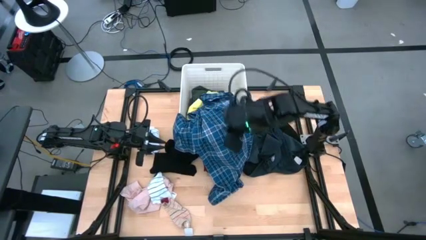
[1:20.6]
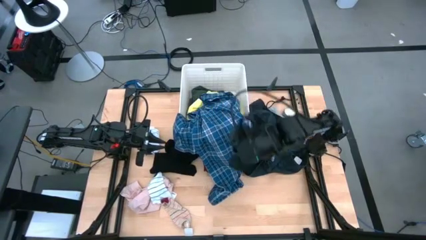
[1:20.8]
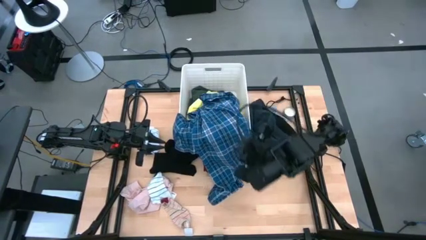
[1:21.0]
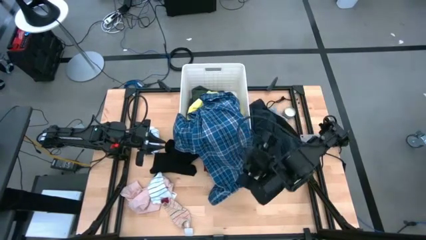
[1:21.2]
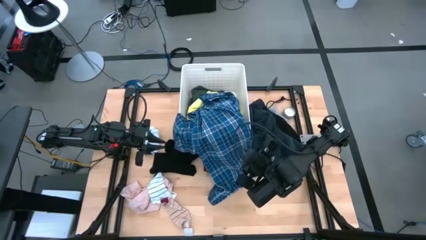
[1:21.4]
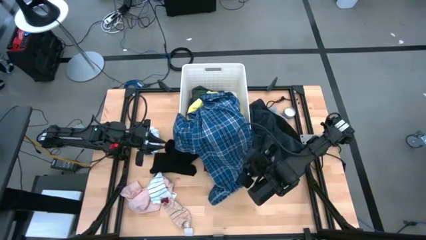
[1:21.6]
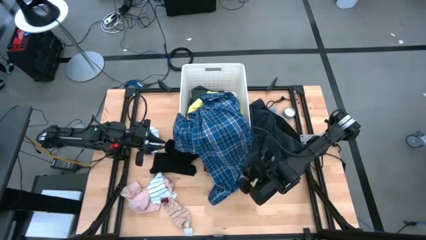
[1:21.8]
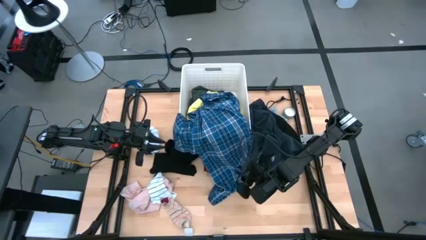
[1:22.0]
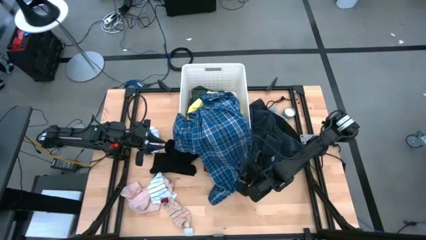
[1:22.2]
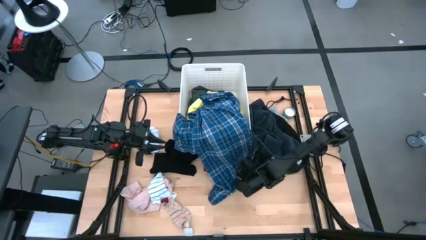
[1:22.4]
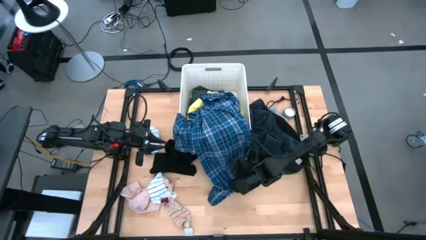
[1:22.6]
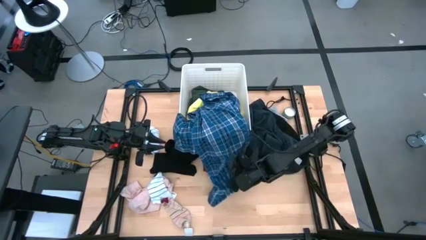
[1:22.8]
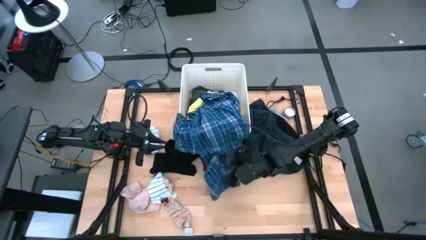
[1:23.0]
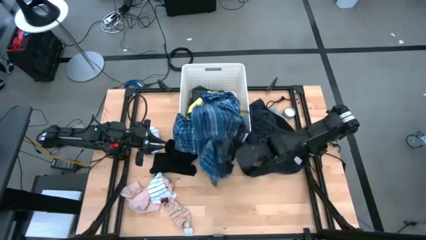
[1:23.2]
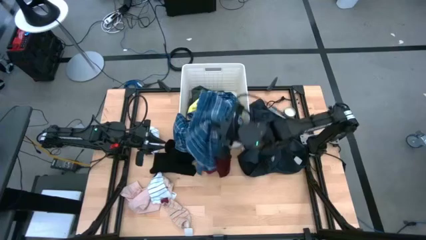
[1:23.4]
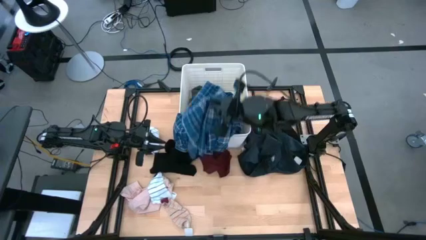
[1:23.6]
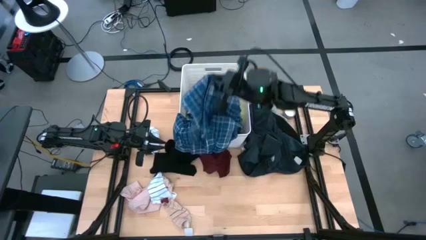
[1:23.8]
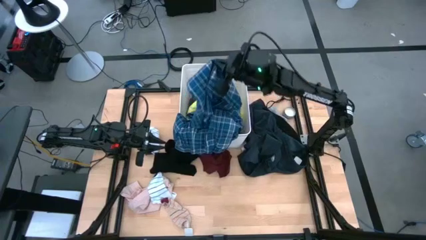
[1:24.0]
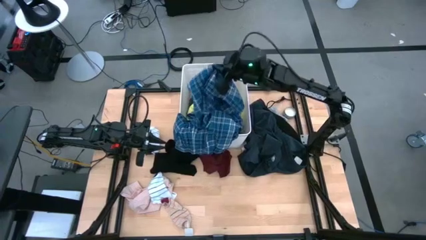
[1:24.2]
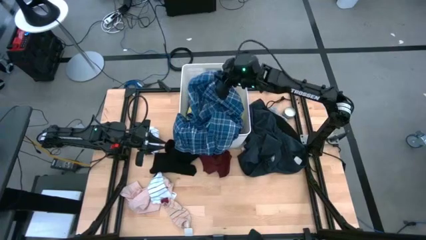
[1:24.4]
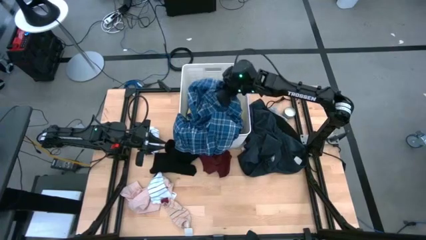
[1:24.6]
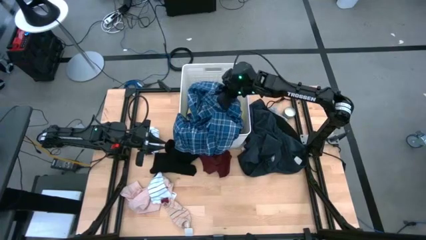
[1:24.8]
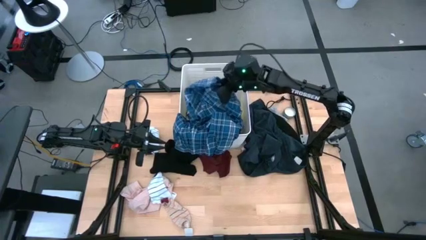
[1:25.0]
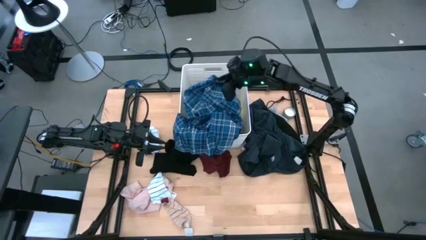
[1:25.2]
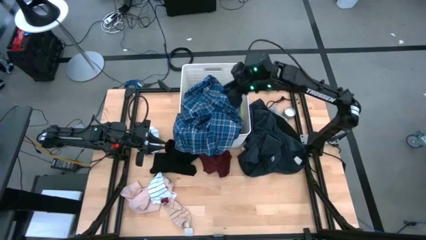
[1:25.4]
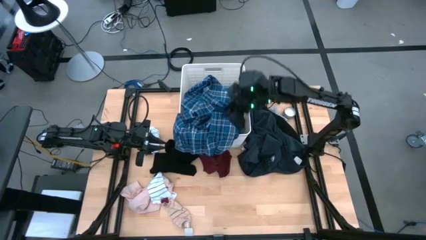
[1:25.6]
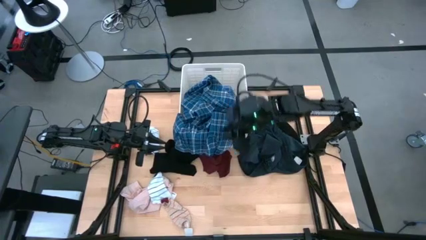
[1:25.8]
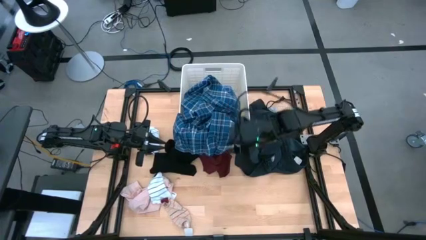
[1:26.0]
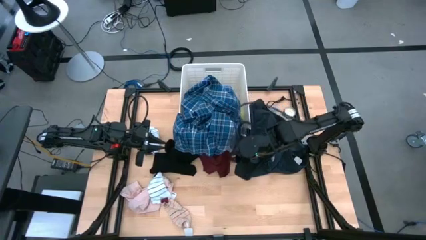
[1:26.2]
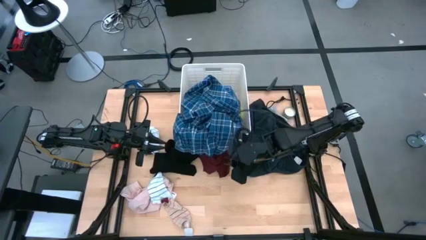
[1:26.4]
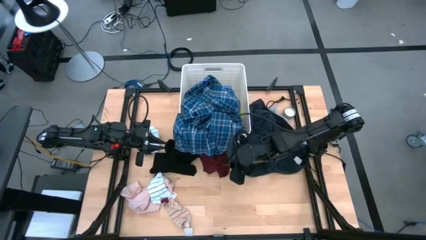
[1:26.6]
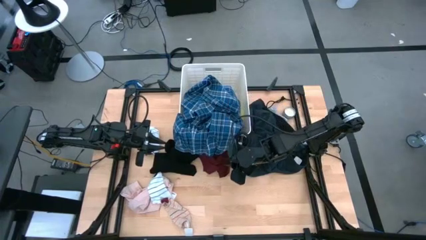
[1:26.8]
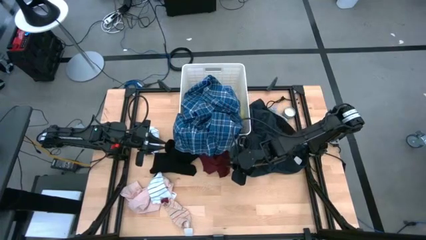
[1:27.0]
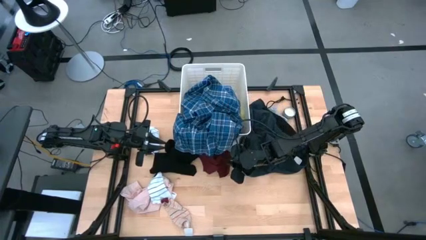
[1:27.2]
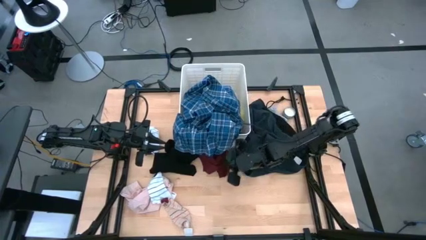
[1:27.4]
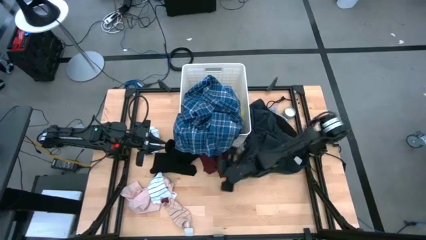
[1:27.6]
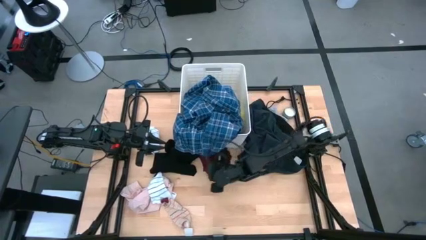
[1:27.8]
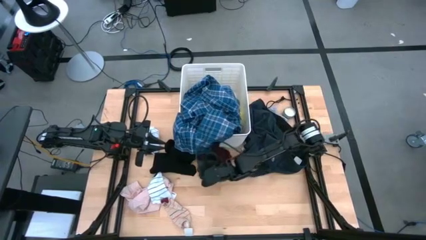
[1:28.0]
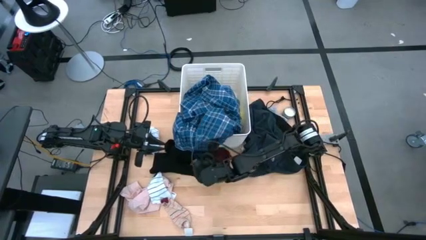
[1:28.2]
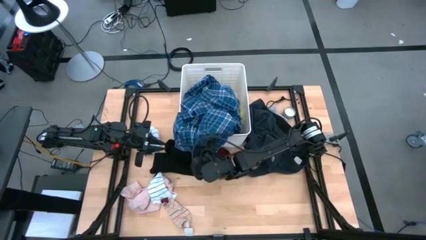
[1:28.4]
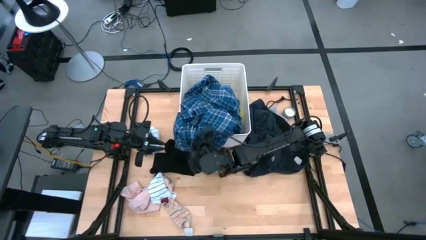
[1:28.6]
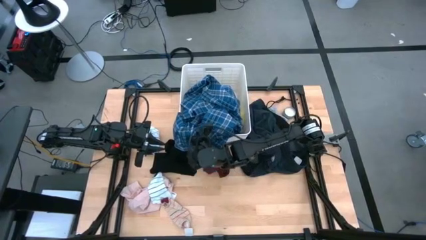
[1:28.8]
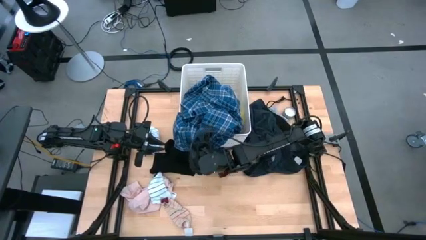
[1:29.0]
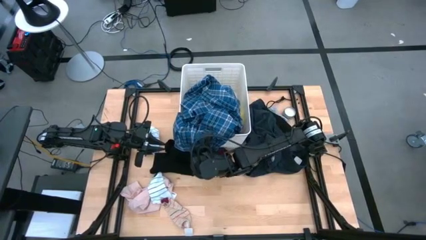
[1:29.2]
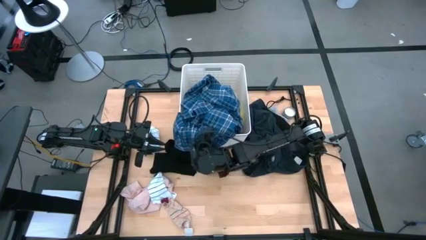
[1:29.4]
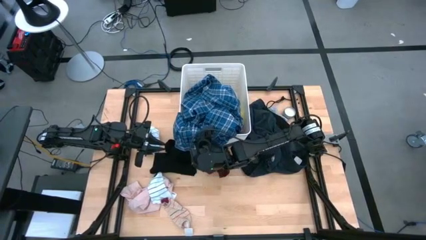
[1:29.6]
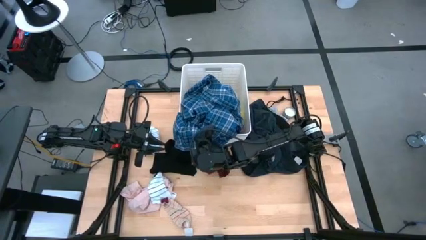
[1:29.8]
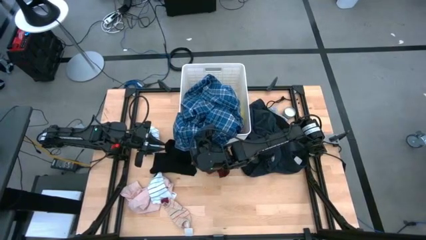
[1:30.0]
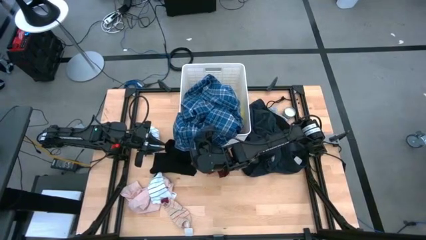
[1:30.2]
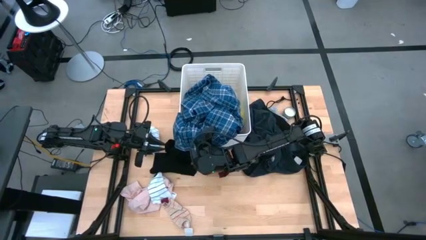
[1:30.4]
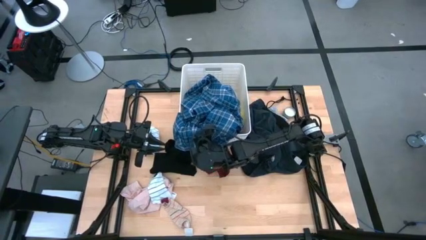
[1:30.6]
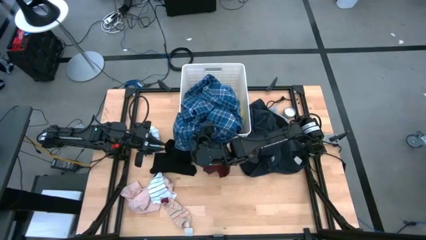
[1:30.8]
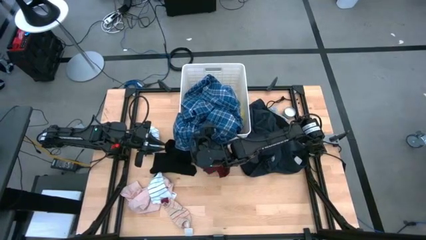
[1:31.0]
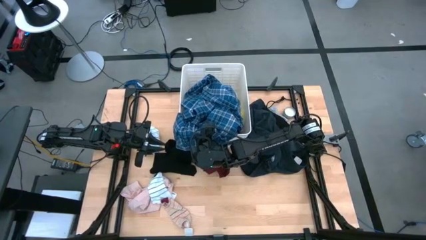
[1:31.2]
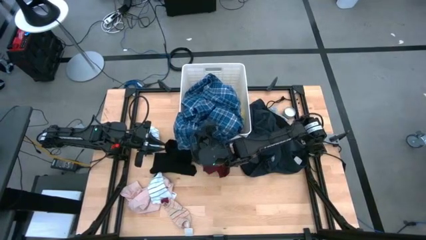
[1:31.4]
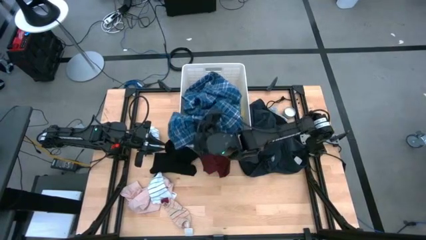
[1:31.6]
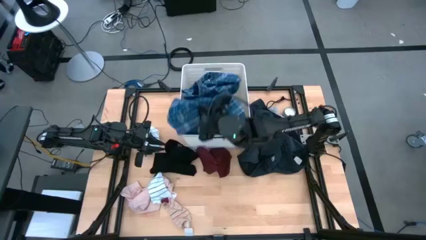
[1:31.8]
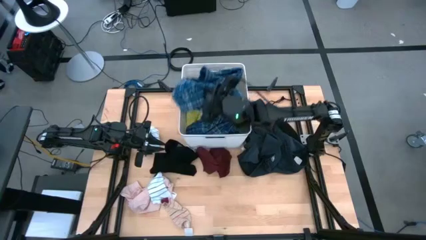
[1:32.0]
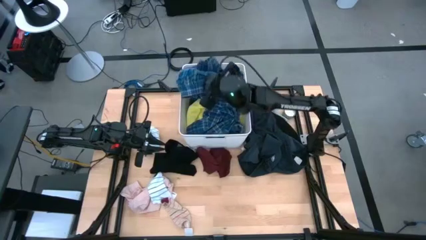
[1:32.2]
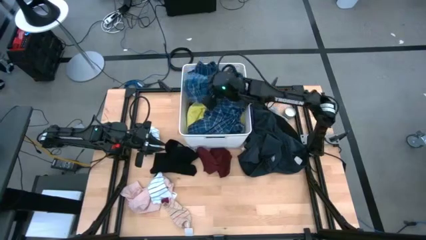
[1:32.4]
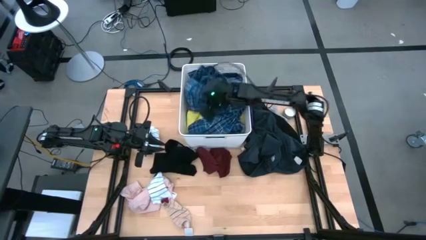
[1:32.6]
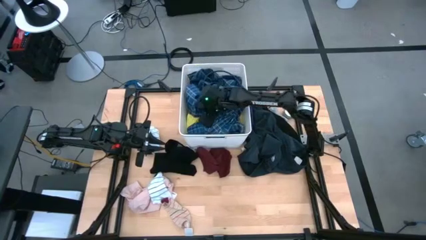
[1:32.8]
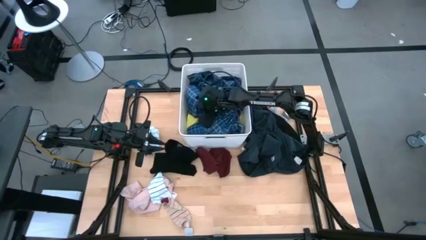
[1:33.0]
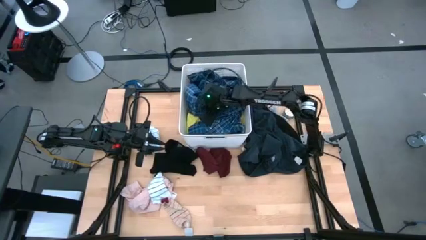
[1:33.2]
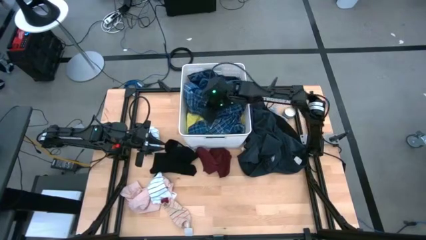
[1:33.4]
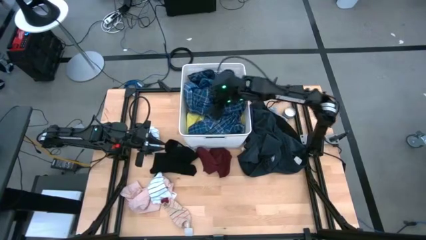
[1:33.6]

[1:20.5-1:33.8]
Task: Sort clothes
Put the blue long pants into the laundry bin

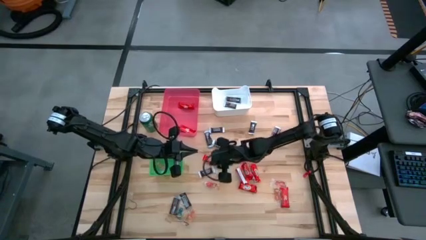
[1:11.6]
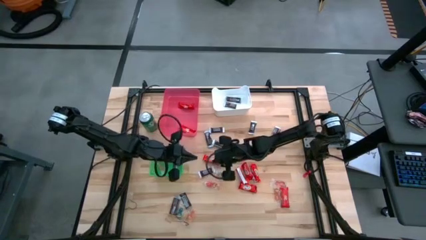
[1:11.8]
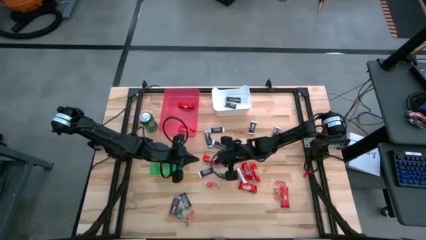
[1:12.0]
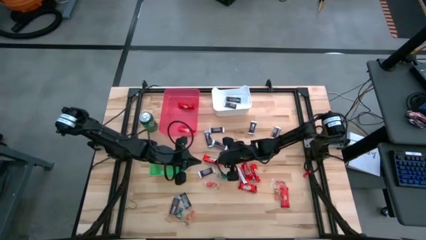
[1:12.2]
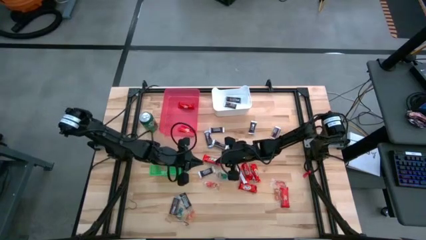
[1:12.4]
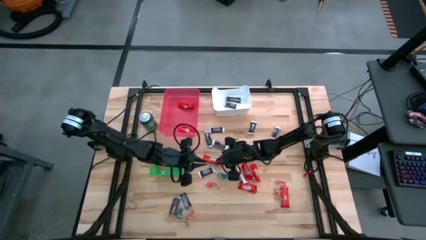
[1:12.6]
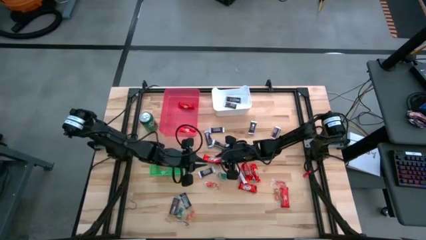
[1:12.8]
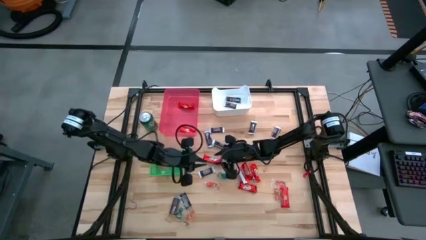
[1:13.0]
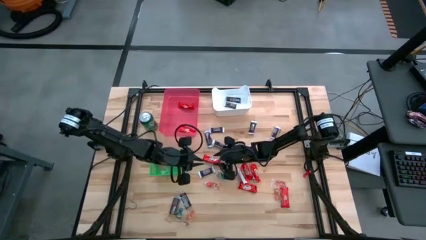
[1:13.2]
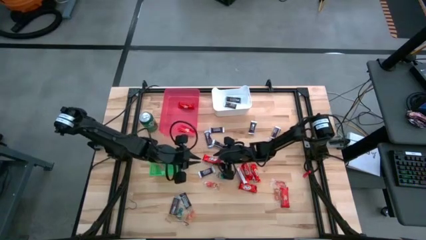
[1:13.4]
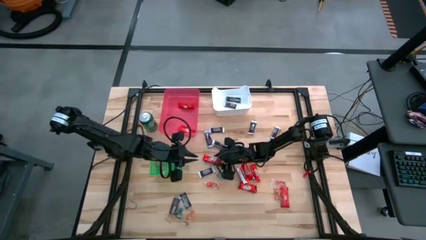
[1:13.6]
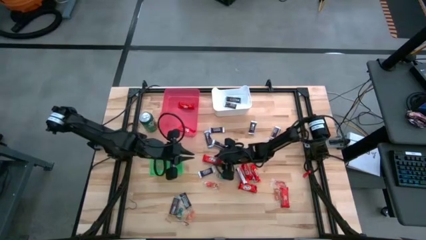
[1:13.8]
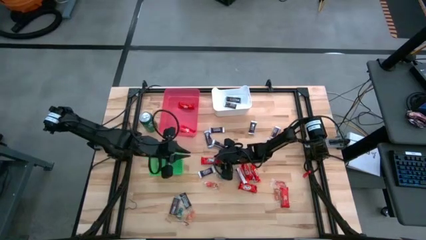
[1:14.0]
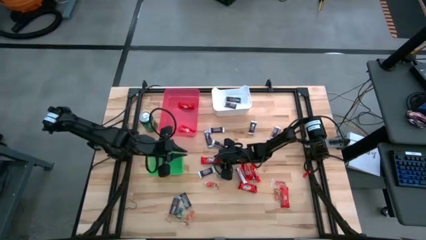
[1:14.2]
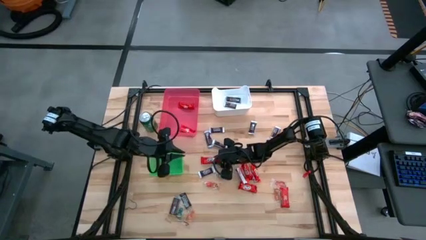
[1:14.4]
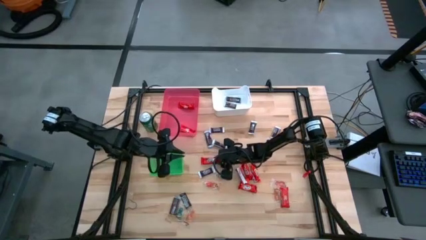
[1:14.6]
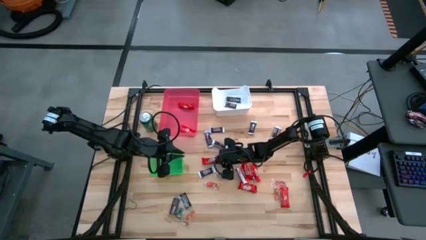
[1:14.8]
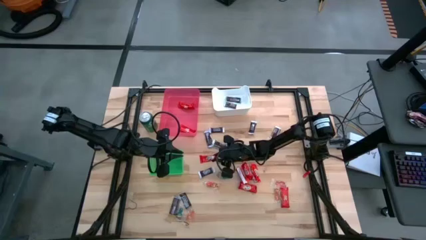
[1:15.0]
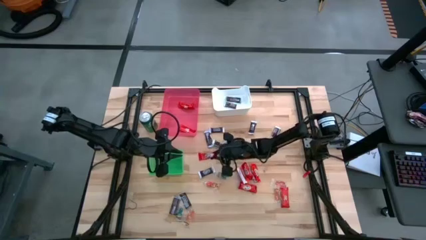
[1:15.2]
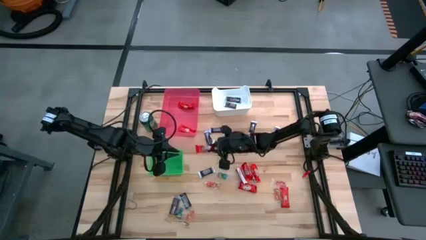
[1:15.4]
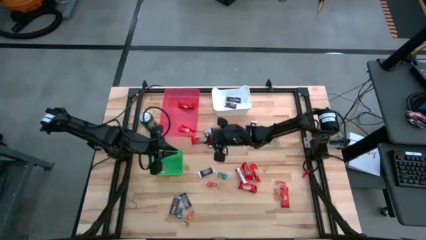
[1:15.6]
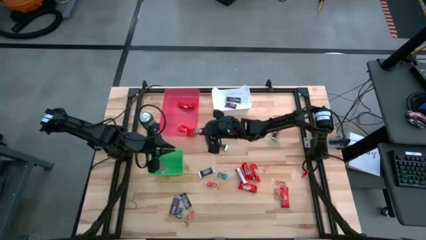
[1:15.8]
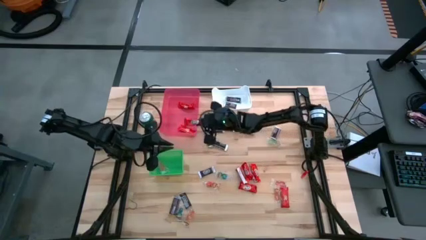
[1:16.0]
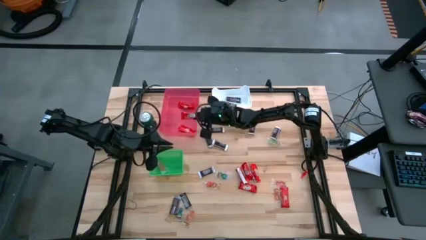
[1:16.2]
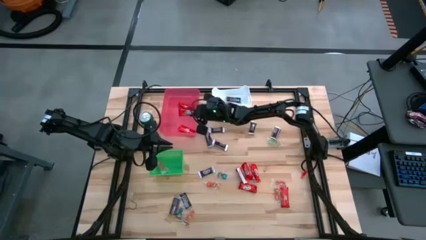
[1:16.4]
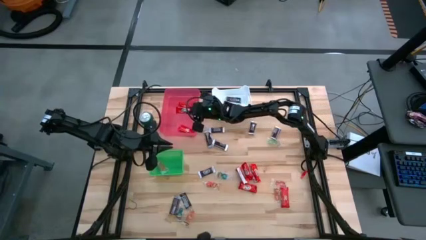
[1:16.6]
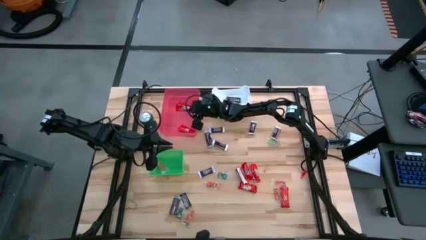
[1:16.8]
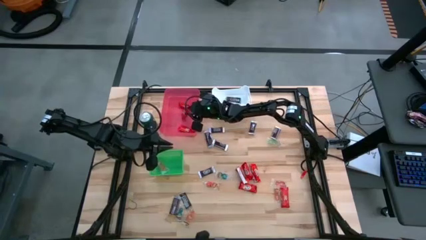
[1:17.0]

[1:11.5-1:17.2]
Task: Organize candy in baskets
Put the red chocolate into the pink bin
